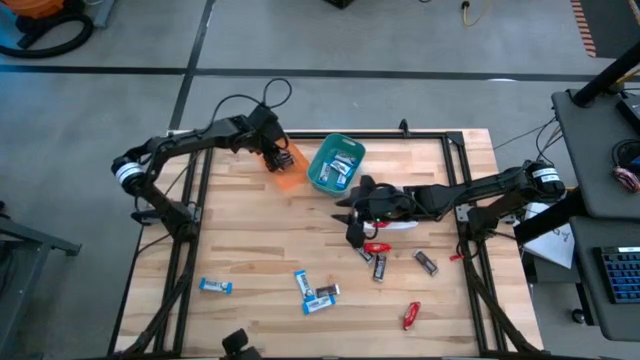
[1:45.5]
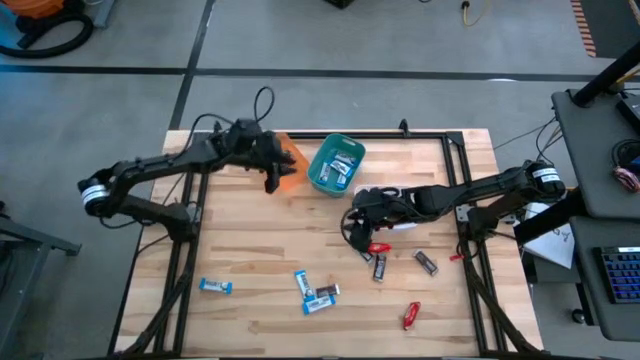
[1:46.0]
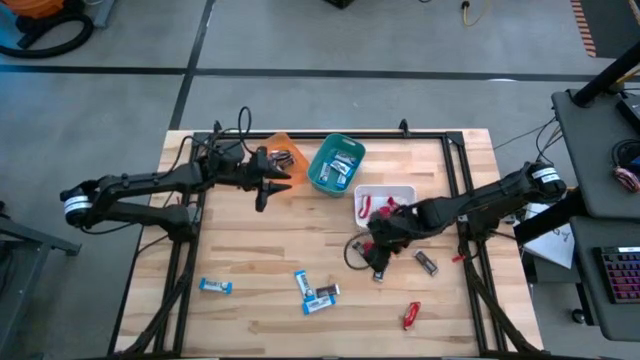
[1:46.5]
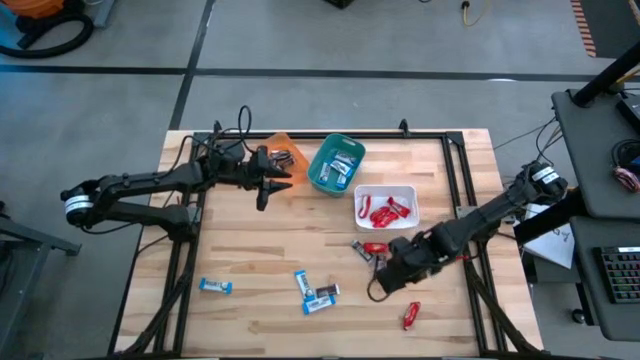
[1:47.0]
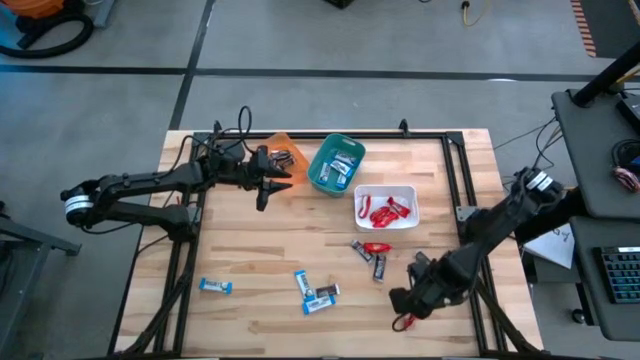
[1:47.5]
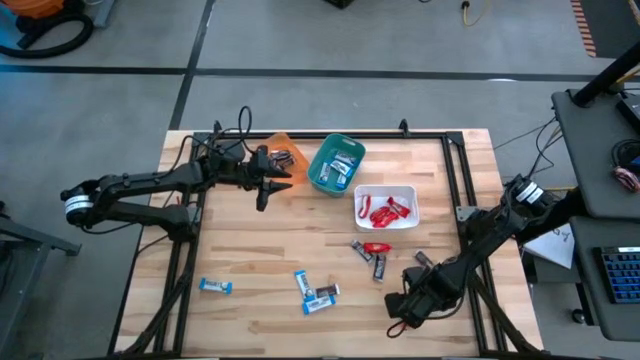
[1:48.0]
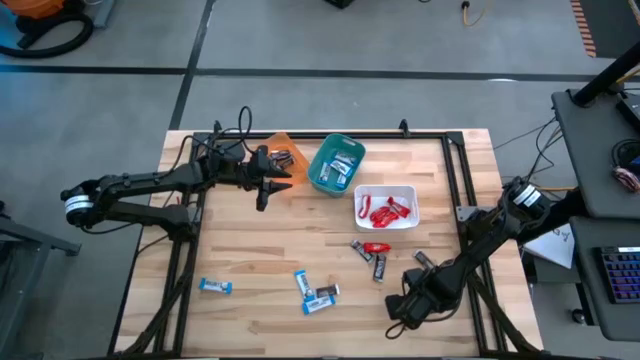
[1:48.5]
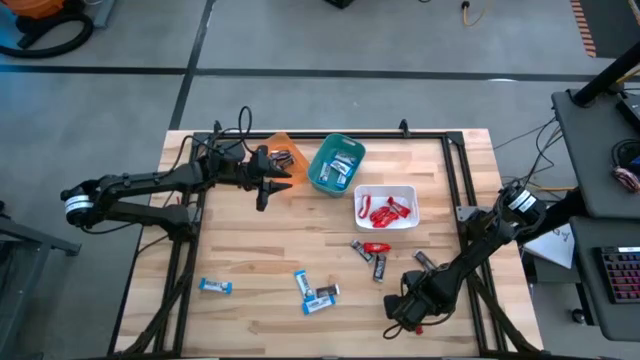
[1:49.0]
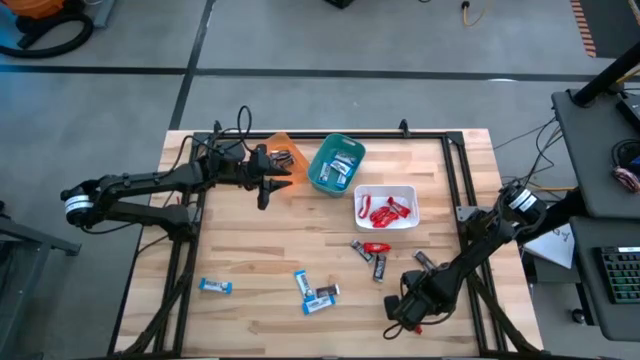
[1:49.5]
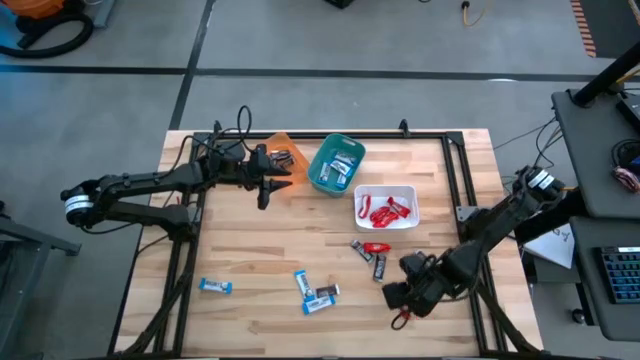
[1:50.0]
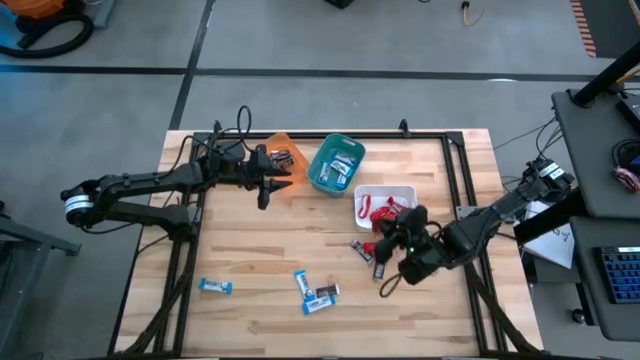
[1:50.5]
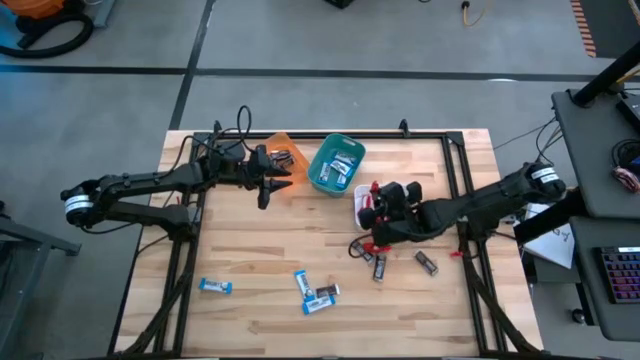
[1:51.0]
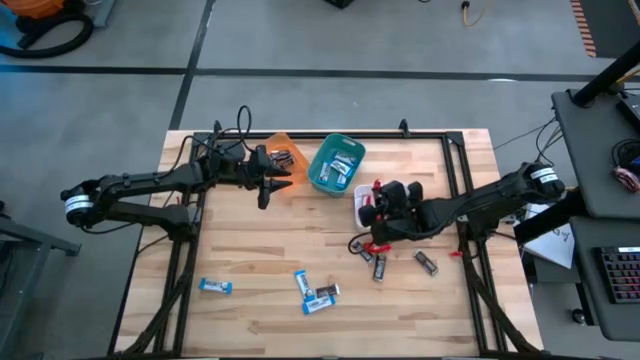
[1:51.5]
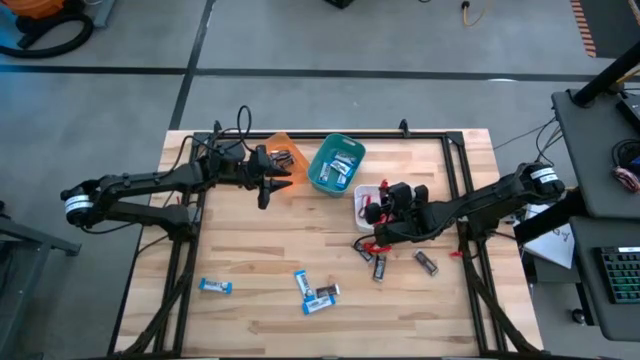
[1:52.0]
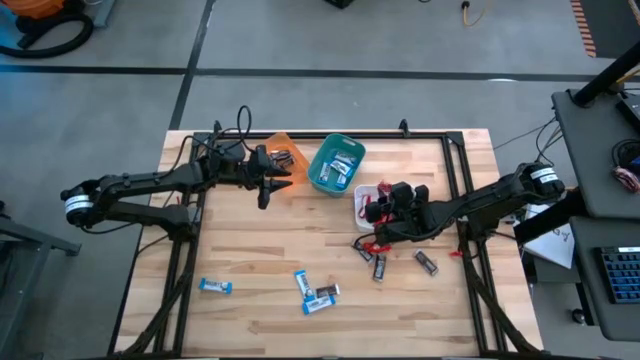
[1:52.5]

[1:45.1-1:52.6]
Task: Sort candy
Put the bottom red chocolate bar into the white bin

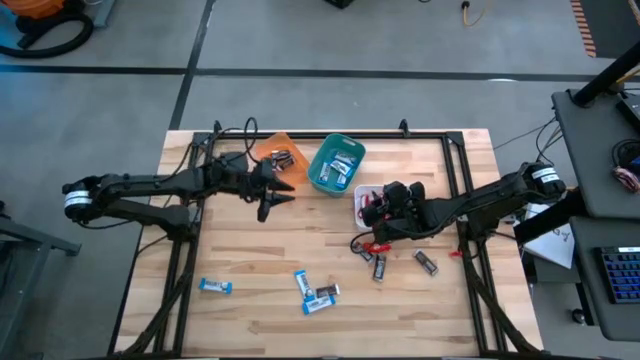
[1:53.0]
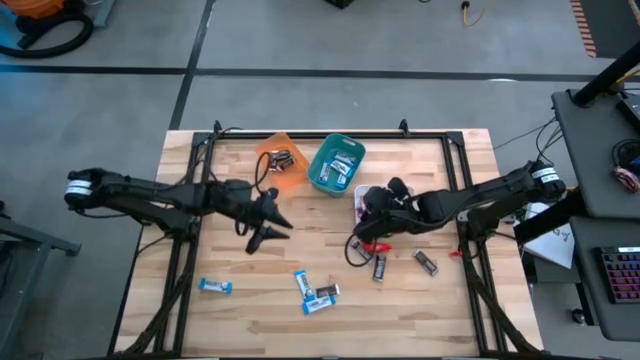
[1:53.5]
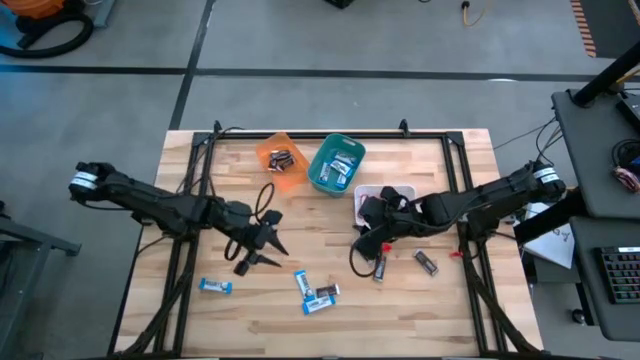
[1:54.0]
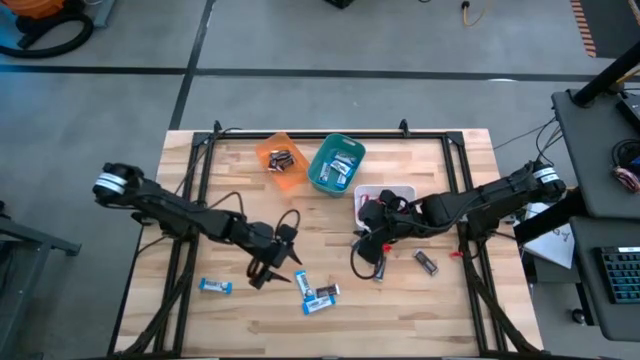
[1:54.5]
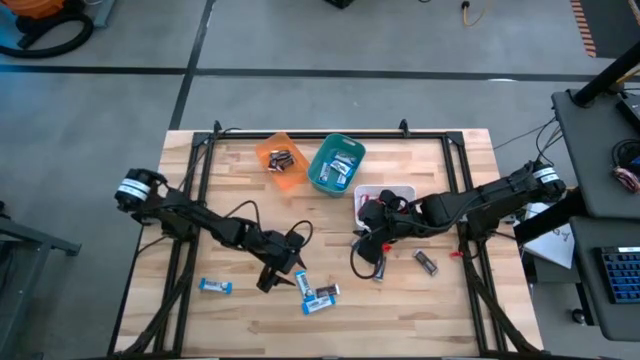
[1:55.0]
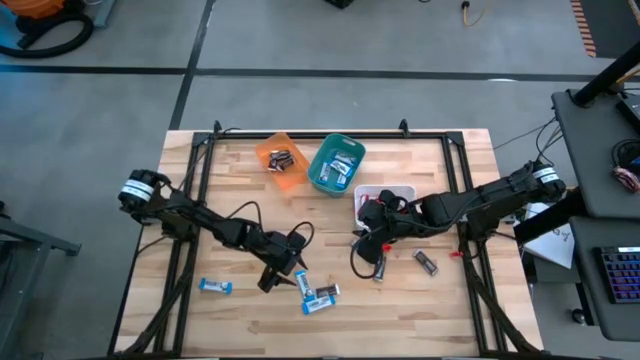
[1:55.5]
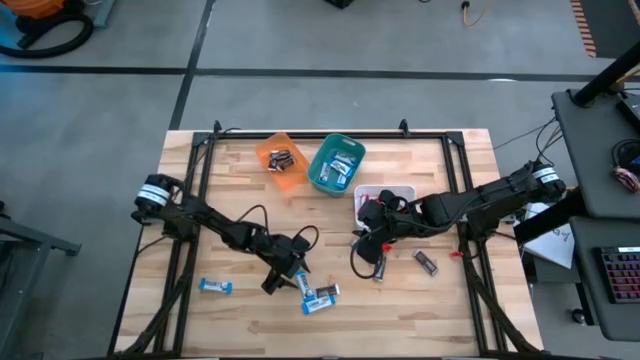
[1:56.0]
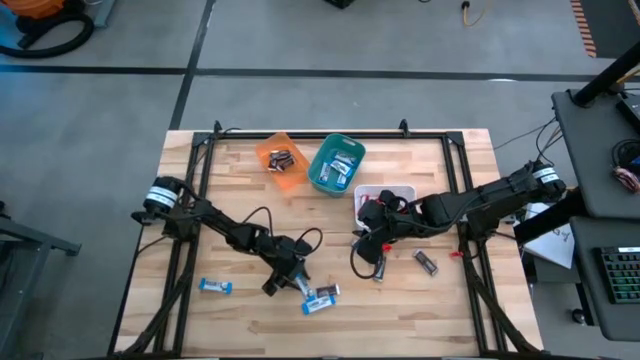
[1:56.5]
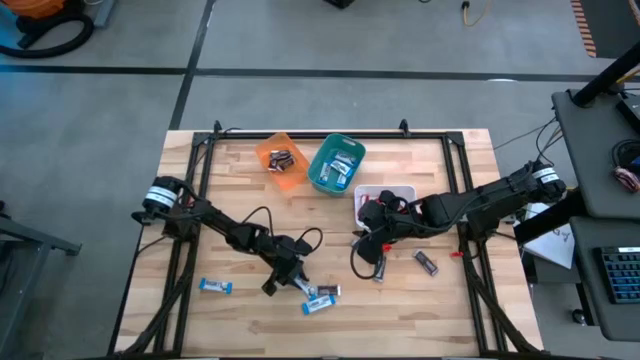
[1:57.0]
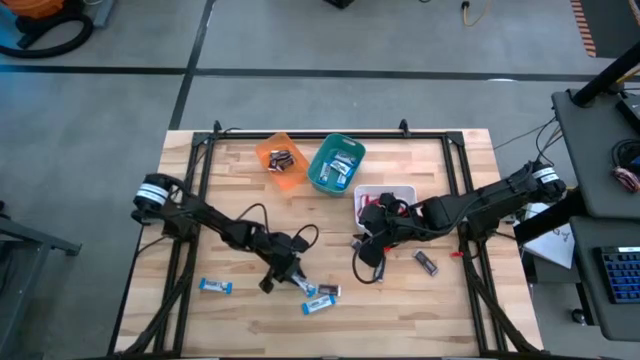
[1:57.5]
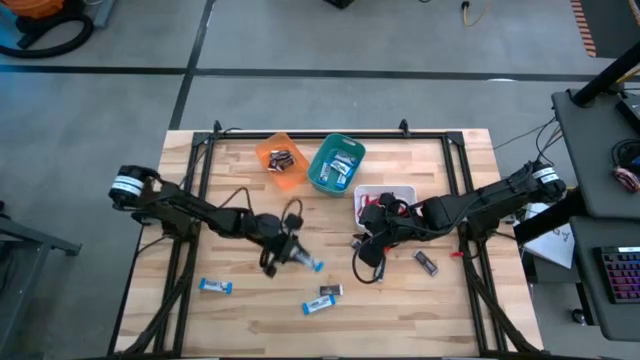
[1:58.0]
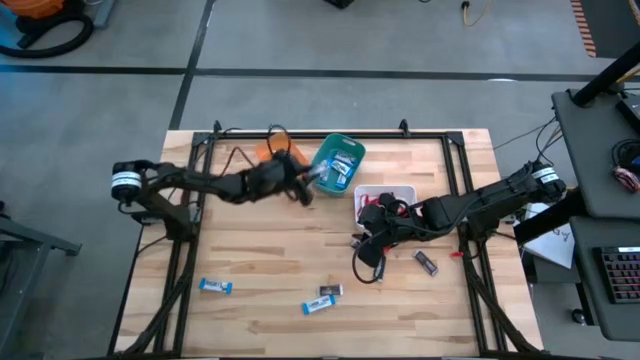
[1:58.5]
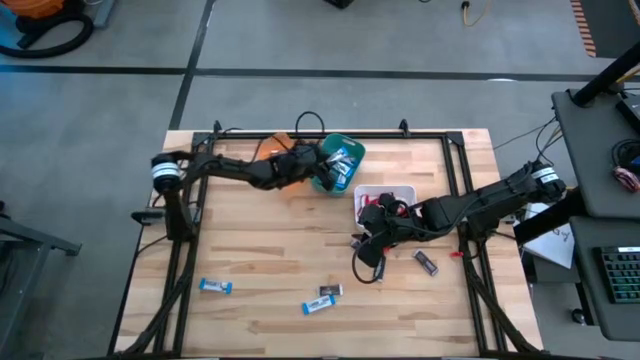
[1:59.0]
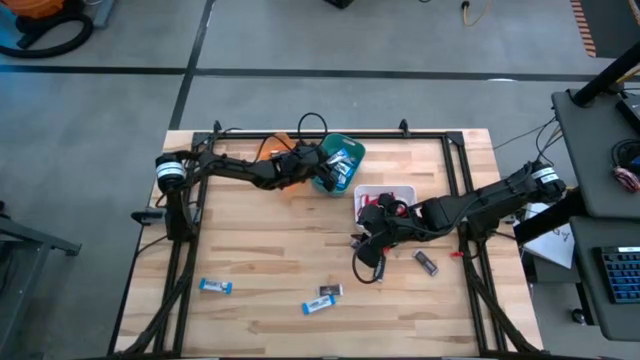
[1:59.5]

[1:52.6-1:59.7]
Put the top right white chocolate bar into the green bin

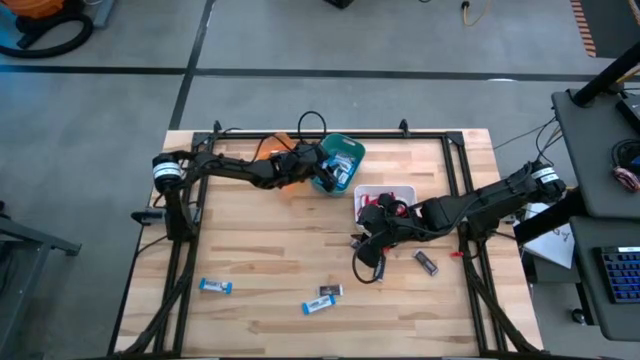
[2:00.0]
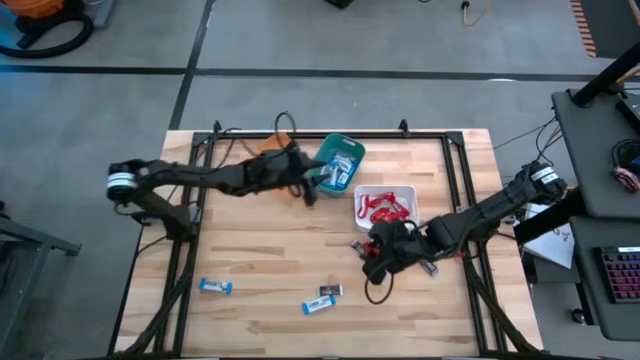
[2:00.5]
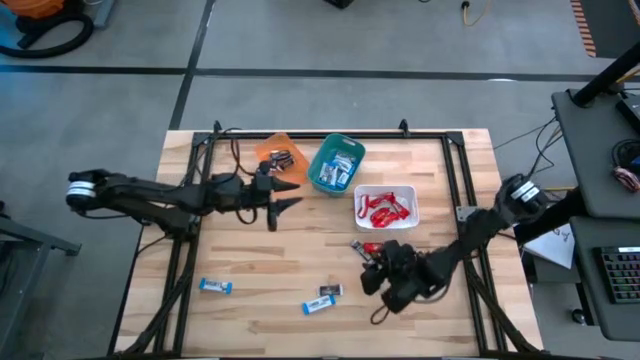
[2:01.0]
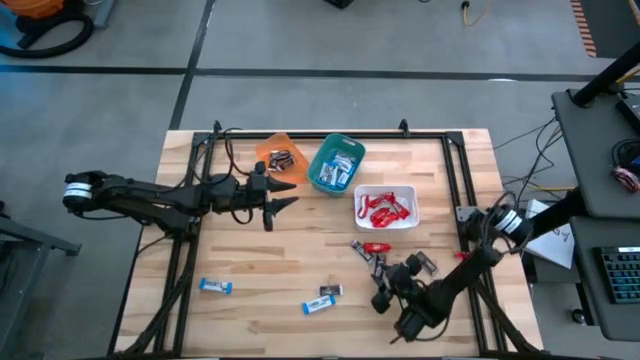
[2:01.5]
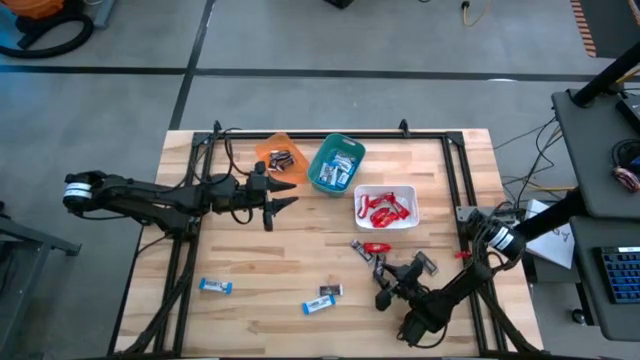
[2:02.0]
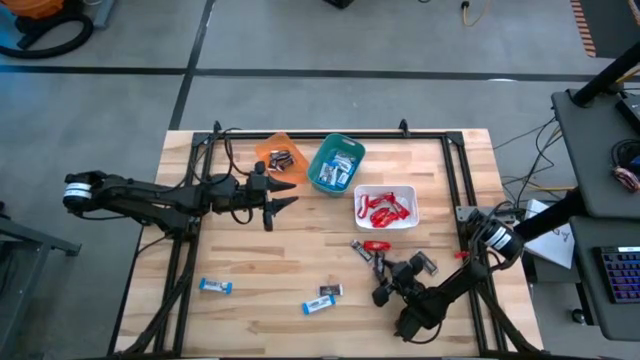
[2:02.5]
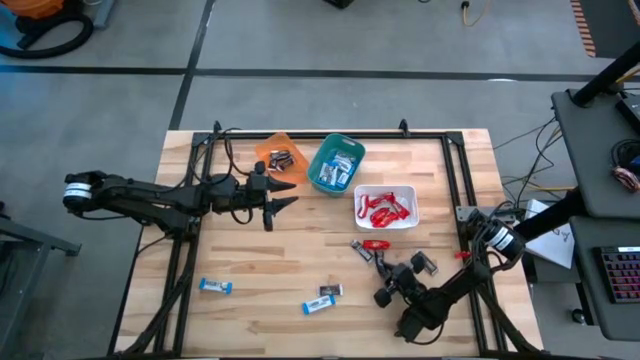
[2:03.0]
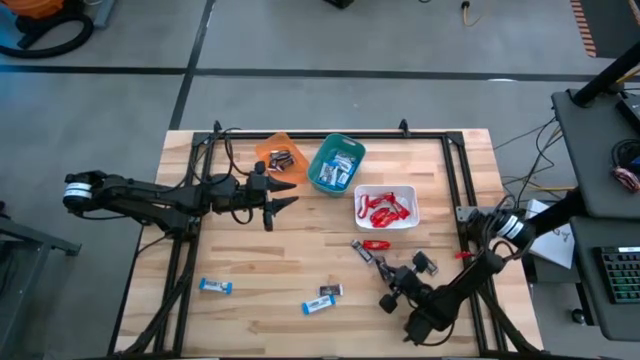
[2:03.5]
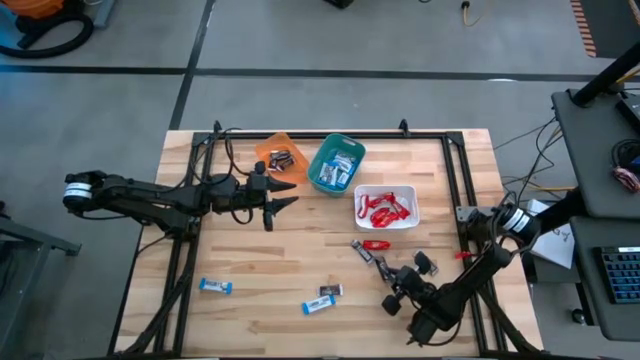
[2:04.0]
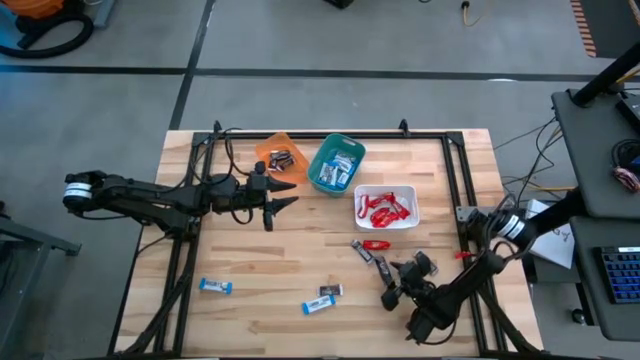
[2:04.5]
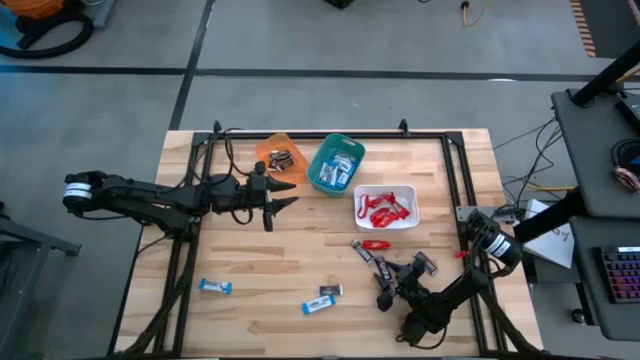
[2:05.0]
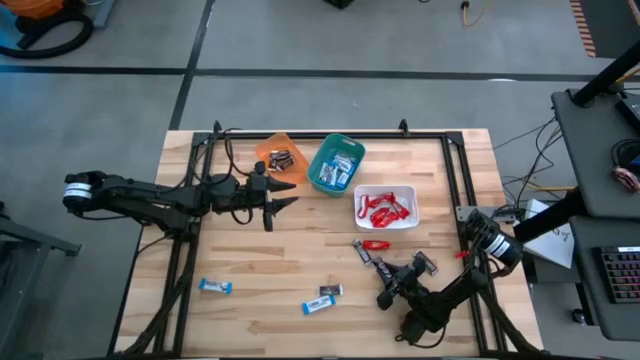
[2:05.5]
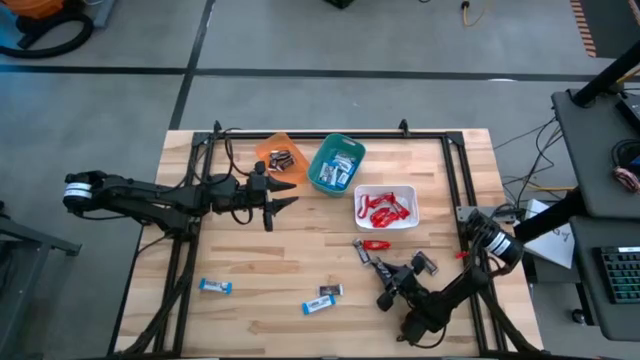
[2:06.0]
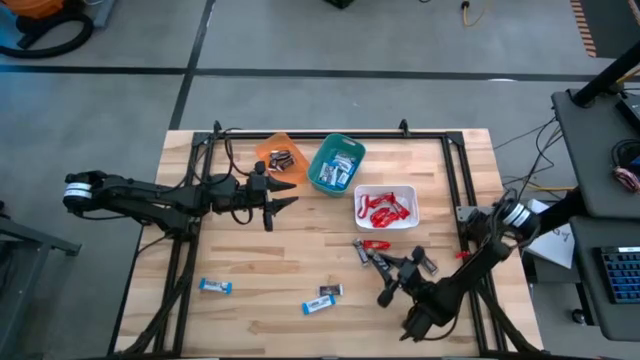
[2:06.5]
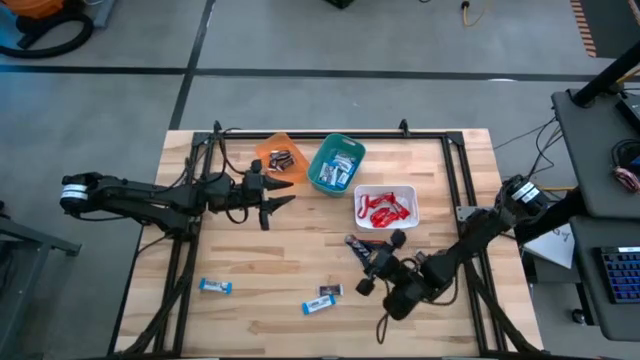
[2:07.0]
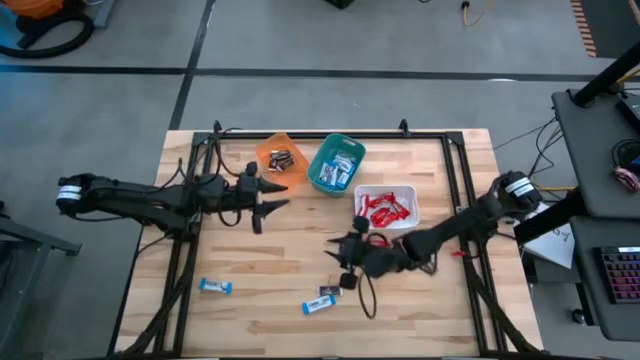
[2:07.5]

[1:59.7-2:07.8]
Put the brown chocolate bar into the orange bin
